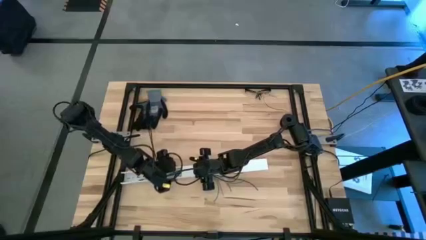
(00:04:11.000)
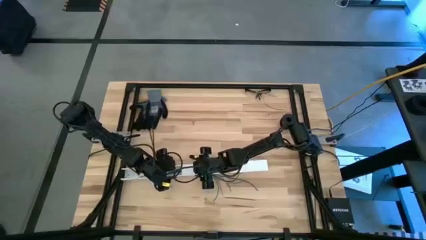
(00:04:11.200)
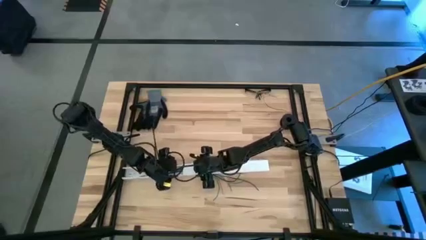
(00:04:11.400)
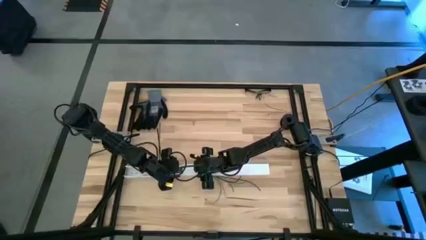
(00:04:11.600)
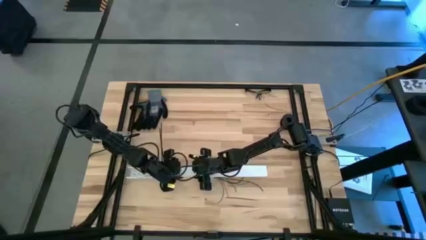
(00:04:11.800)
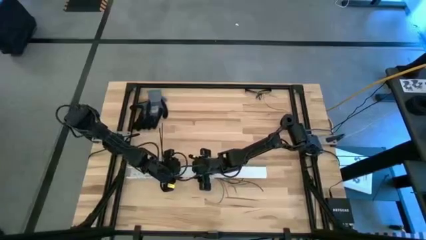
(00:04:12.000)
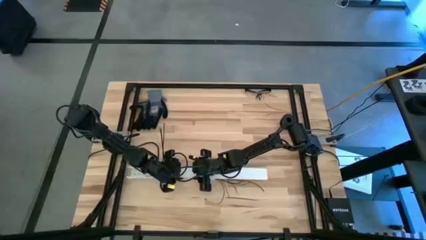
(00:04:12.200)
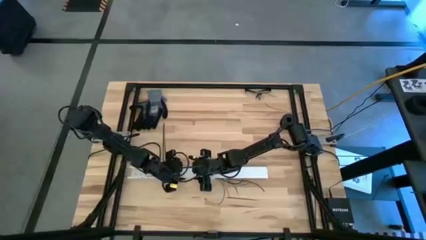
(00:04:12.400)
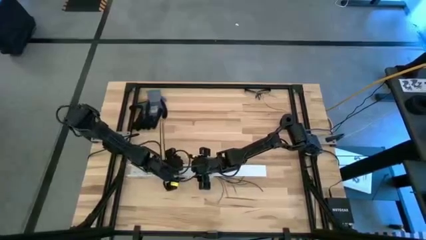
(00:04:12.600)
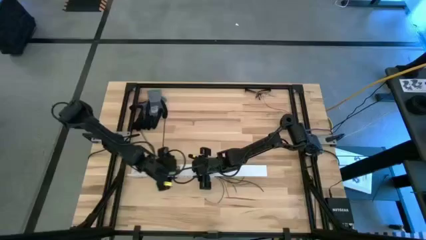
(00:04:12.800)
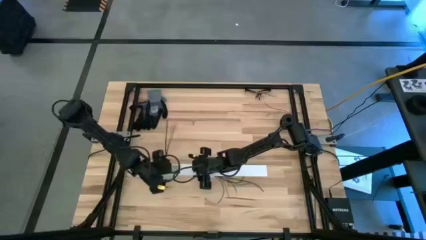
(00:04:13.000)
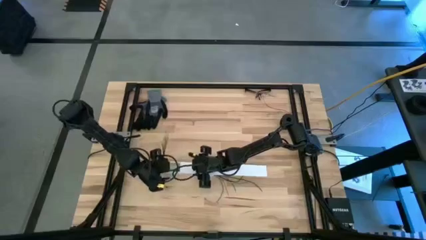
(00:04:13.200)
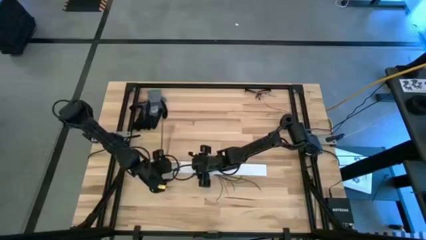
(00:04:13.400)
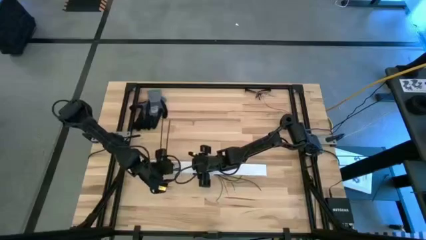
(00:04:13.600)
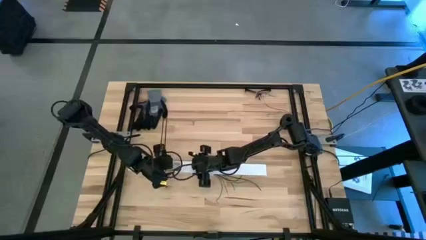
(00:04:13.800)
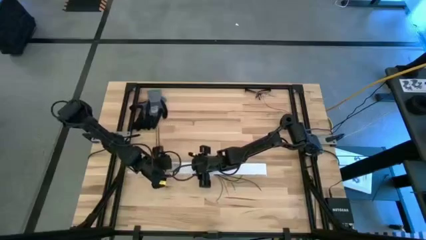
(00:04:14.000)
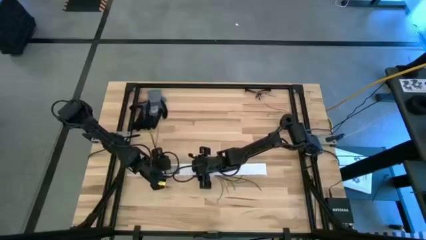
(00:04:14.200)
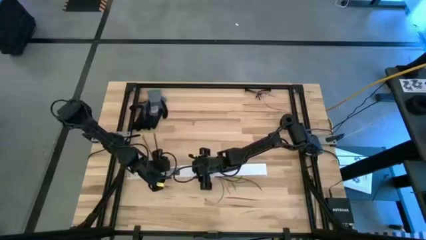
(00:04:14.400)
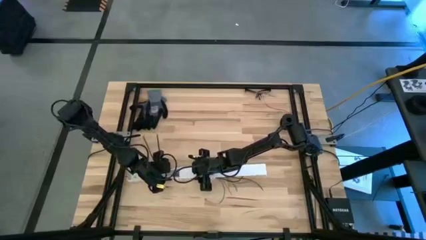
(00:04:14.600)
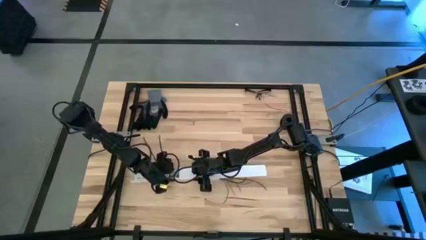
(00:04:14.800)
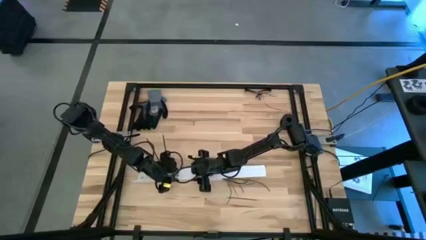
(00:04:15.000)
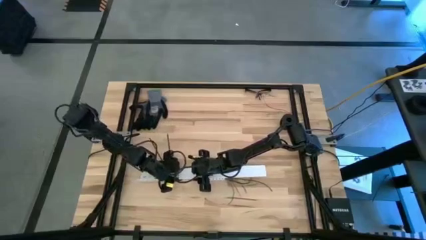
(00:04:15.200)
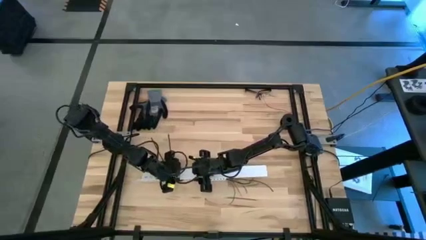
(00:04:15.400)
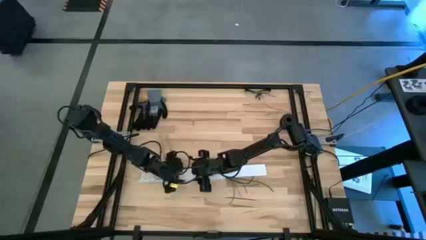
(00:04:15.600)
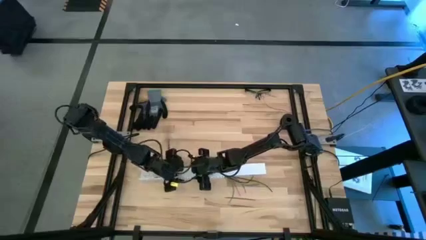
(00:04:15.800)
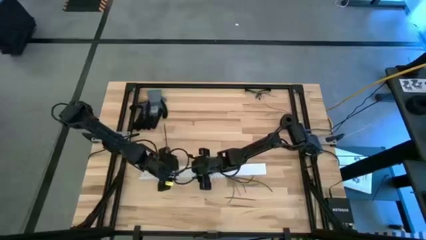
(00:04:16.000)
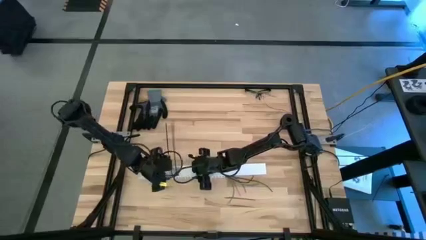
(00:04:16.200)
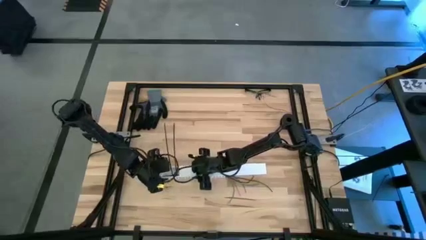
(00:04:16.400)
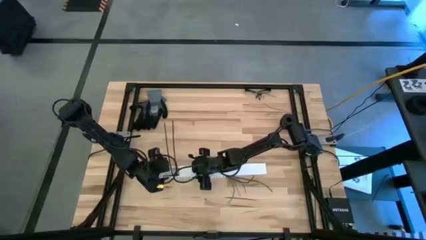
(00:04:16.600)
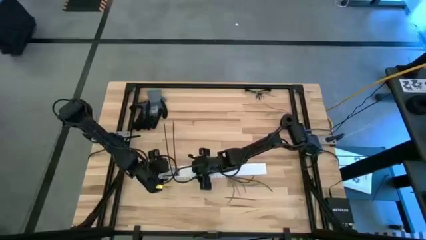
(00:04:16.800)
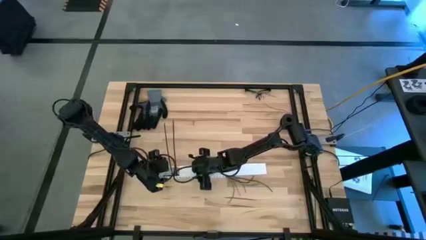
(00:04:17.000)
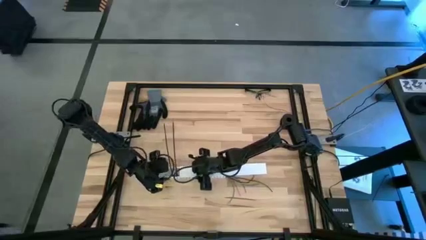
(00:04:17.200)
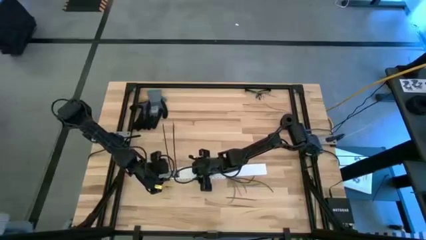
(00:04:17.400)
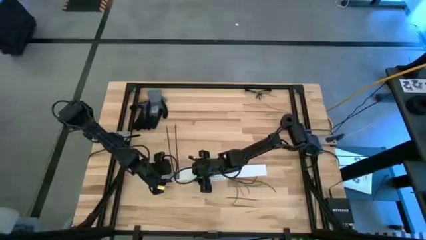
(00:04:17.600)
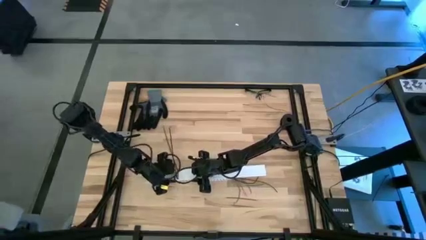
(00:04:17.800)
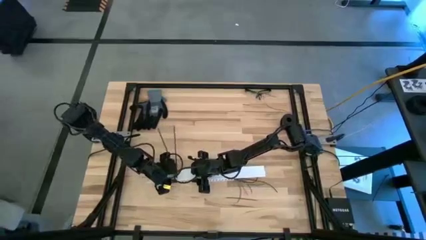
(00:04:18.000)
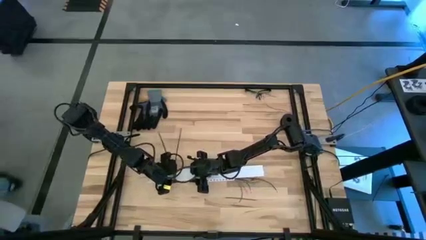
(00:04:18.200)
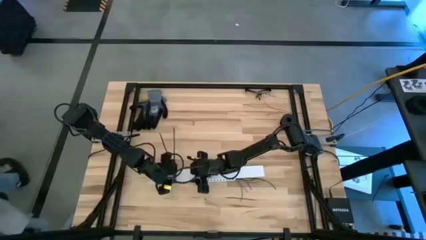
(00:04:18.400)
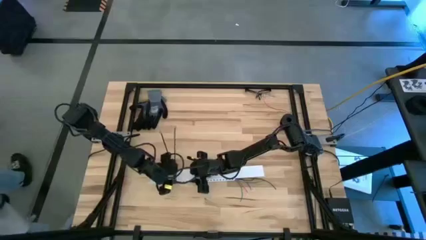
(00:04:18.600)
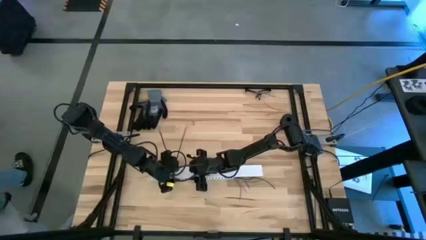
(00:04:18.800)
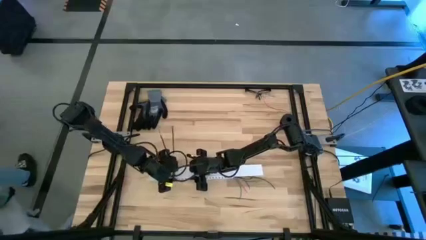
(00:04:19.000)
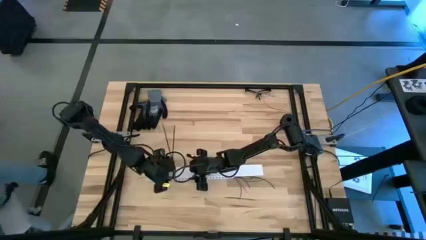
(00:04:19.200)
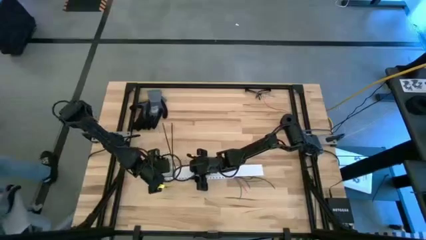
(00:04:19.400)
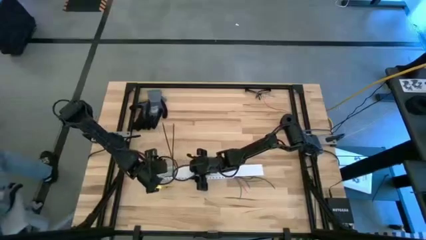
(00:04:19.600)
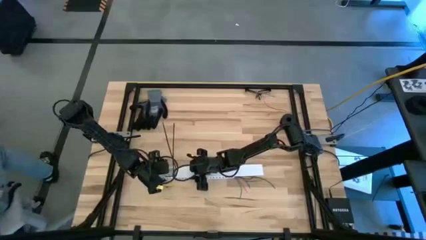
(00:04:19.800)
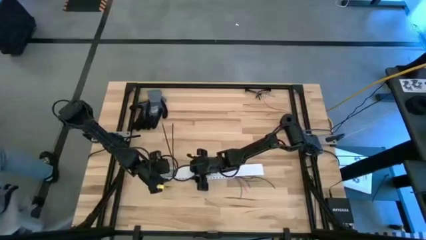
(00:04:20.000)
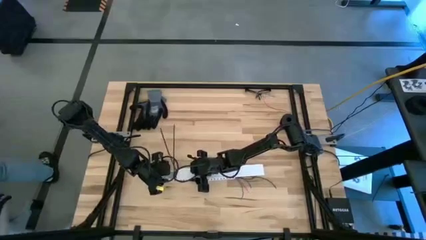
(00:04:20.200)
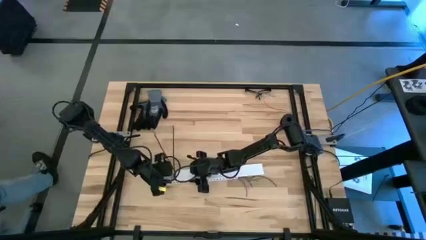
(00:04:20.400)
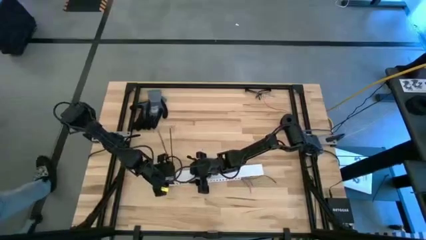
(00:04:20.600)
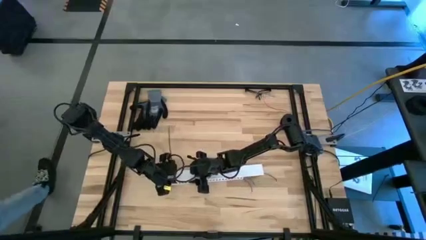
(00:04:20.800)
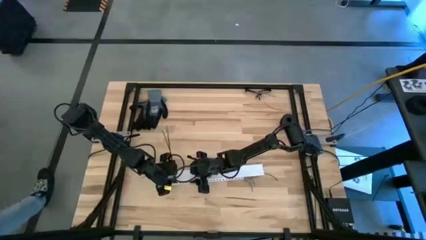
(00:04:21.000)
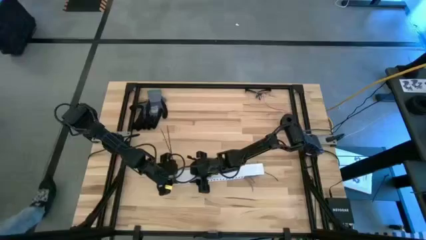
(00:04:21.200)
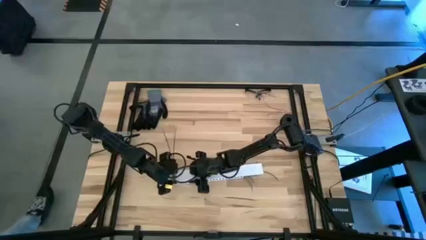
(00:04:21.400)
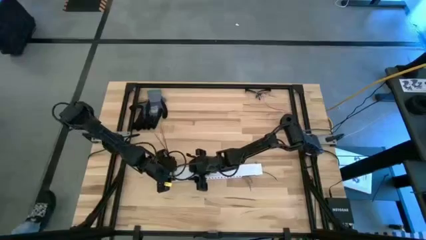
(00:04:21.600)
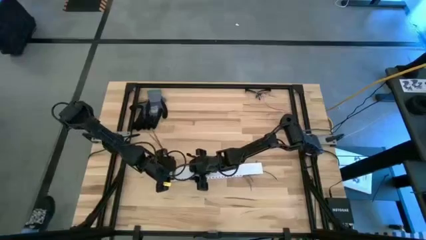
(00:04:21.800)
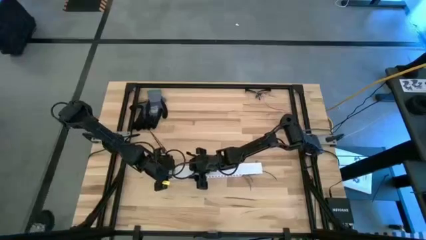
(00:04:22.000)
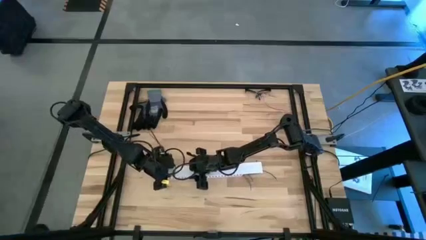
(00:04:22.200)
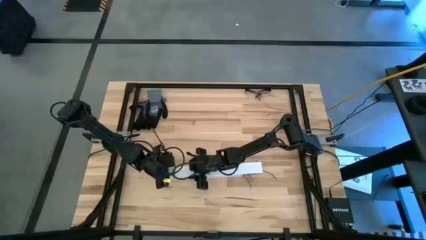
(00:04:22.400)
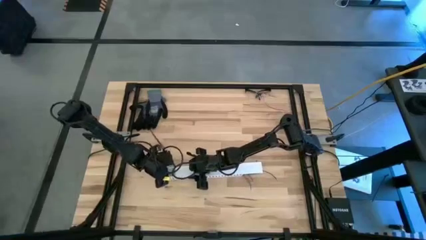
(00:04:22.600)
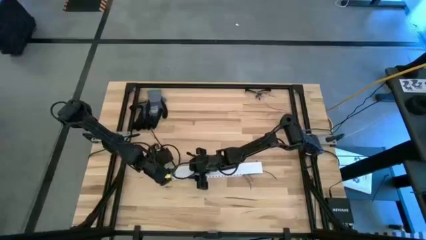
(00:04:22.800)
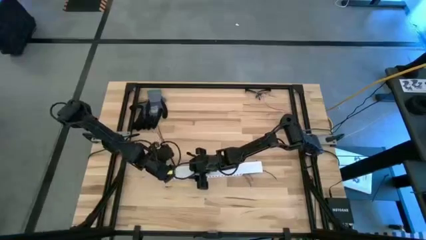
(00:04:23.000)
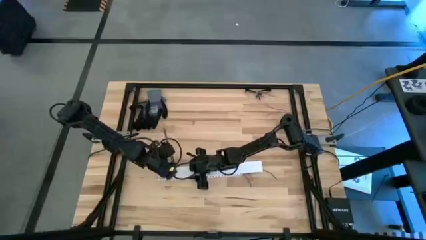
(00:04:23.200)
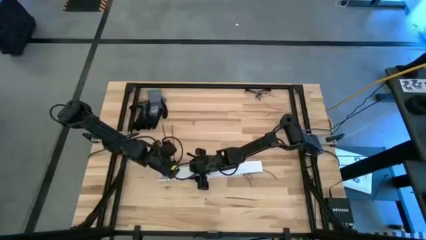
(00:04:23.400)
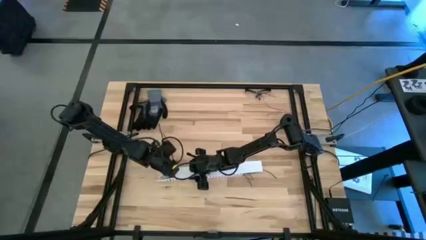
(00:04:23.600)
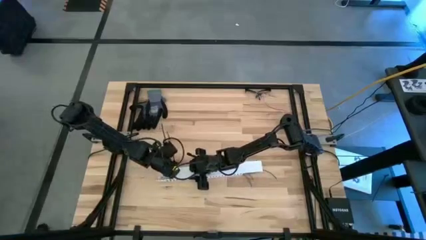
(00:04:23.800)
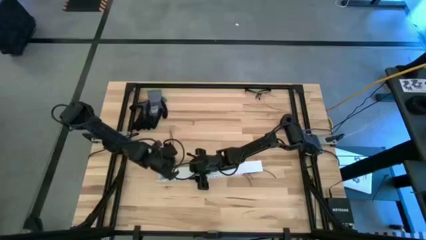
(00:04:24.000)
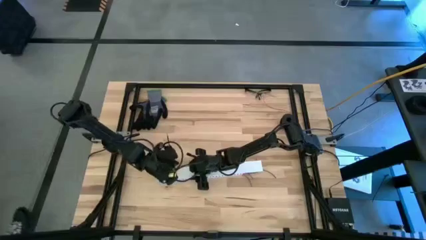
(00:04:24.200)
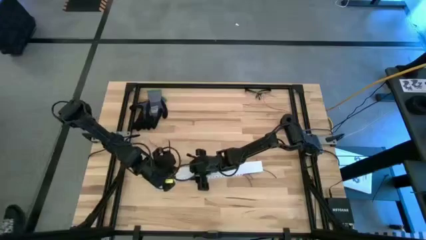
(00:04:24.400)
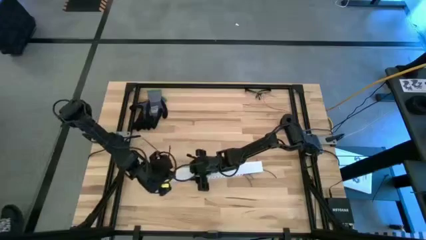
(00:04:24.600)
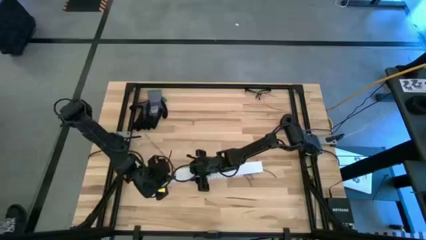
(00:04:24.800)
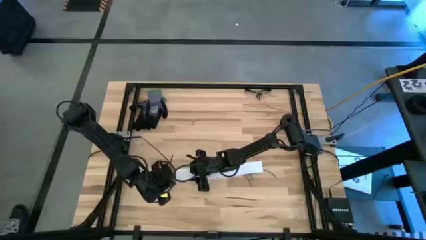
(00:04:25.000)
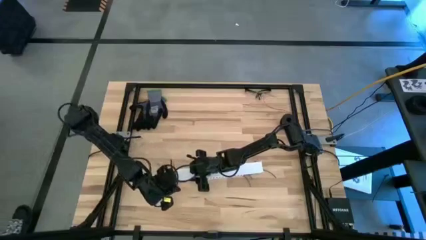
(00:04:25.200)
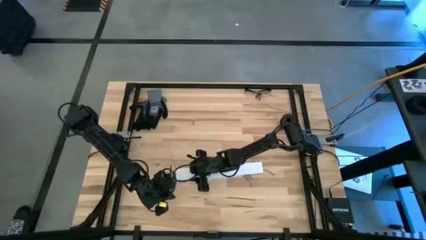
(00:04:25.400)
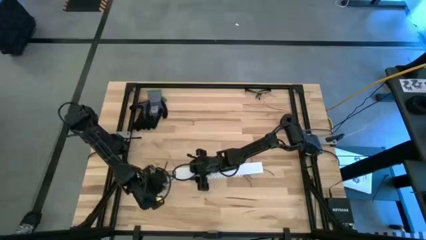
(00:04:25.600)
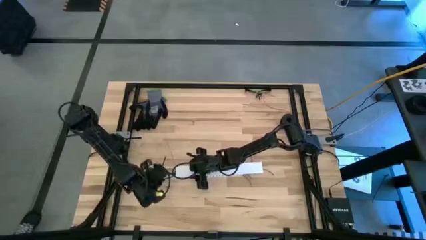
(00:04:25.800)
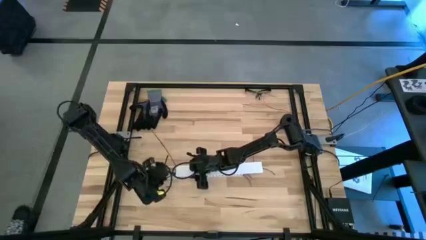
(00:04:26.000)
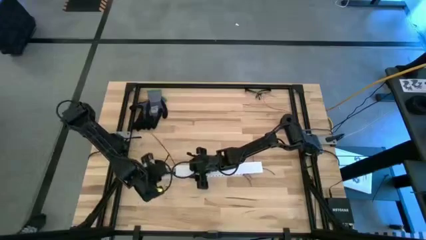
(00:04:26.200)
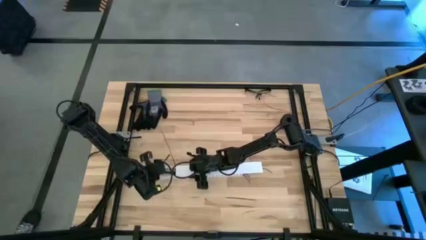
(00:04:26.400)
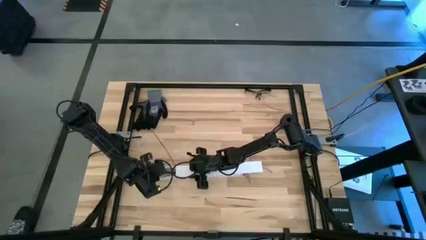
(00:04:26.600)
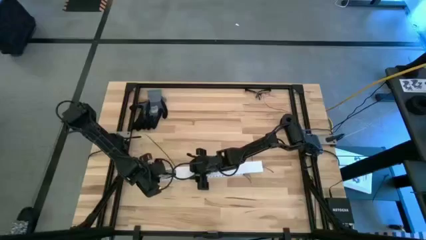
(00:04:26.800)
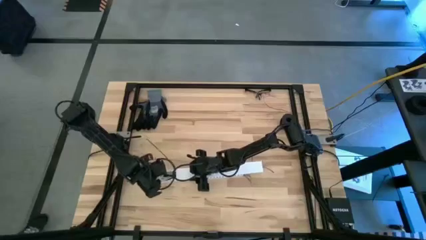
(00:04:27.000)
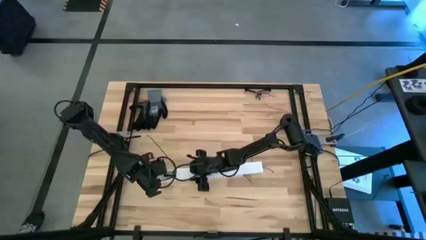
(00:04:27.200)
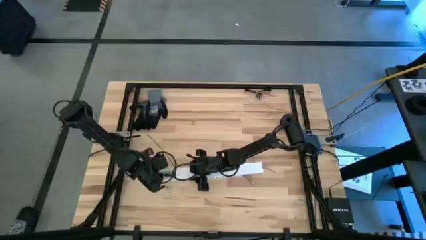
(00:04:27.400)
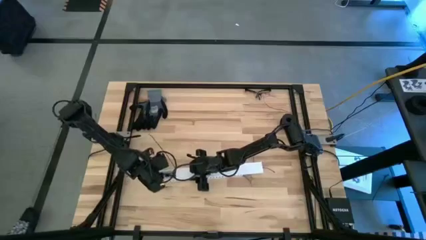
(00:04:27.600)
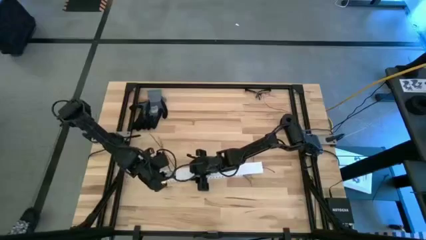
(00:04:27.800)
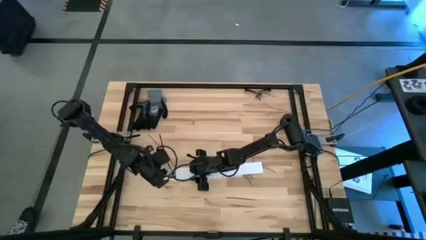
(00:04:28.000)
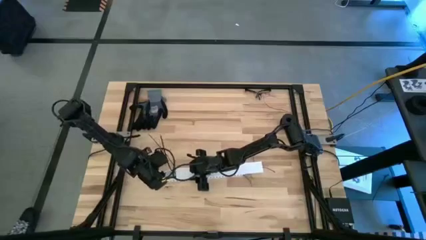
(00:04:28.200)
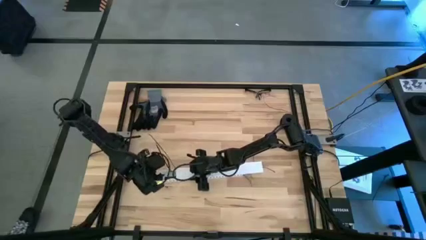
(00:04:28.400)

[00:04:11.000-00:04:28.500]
Task: Ziptie cables
Close the white cable duct
